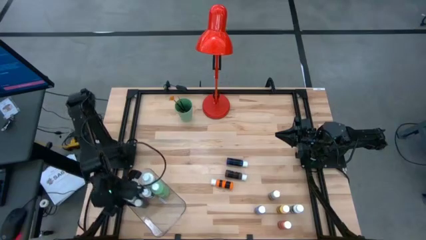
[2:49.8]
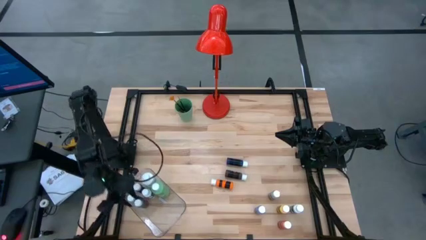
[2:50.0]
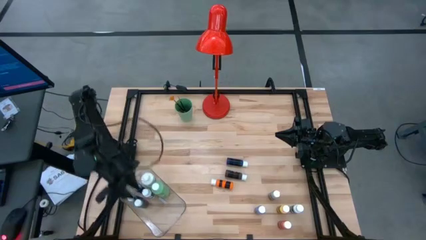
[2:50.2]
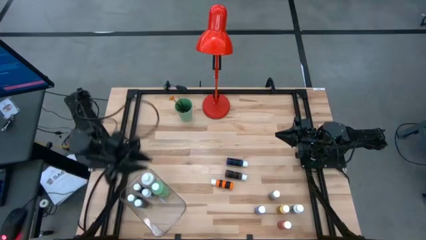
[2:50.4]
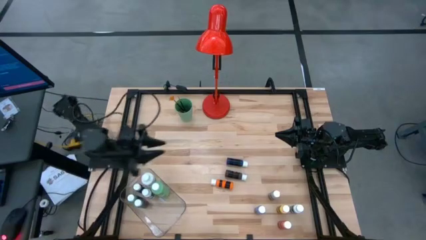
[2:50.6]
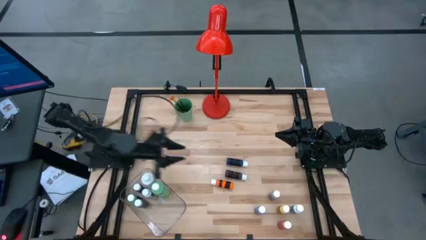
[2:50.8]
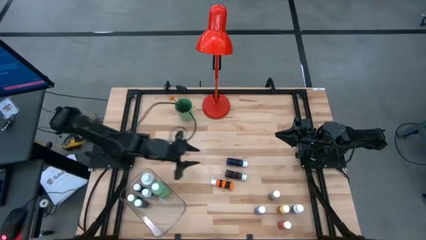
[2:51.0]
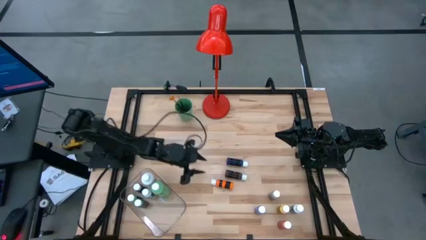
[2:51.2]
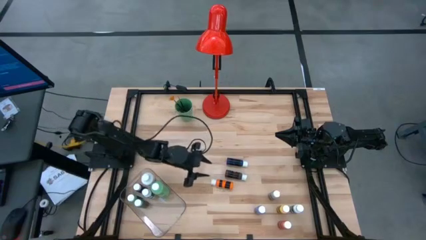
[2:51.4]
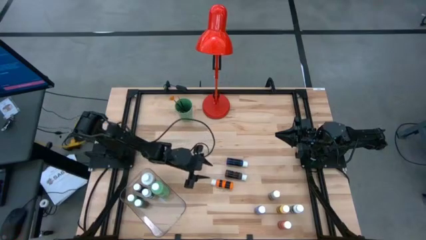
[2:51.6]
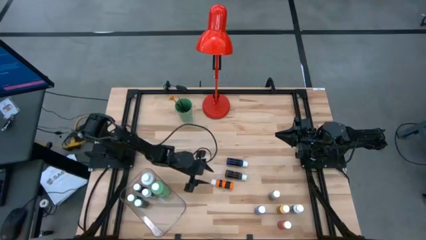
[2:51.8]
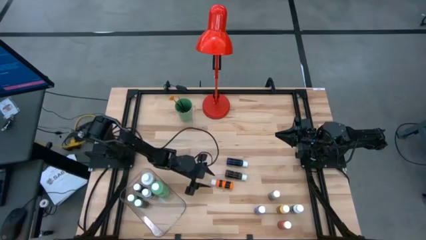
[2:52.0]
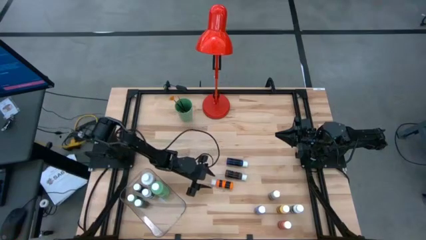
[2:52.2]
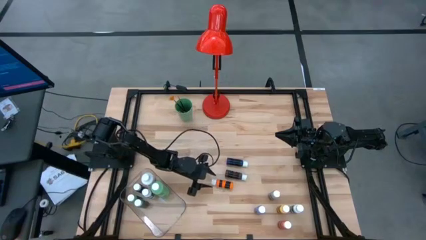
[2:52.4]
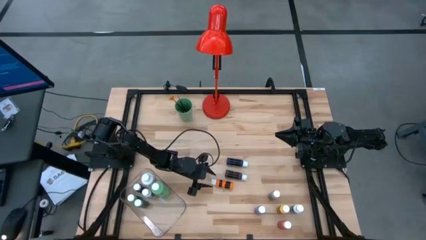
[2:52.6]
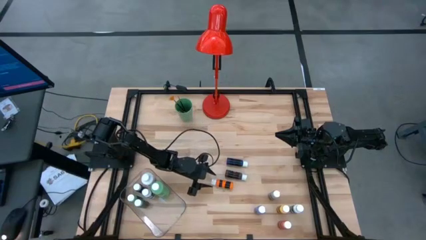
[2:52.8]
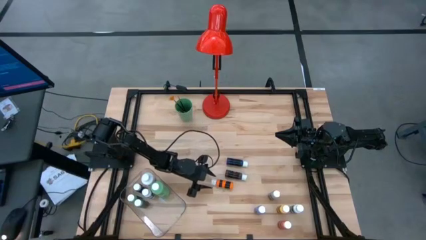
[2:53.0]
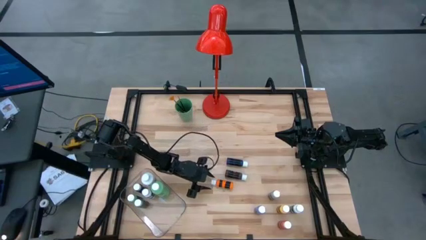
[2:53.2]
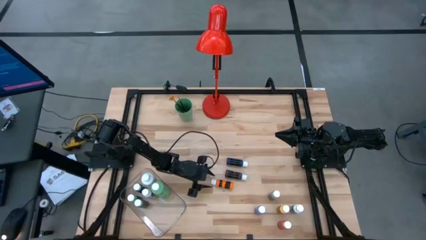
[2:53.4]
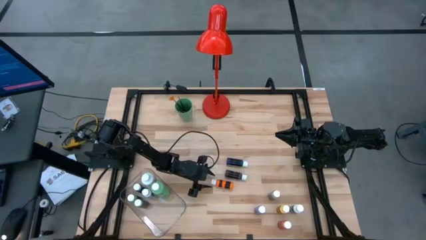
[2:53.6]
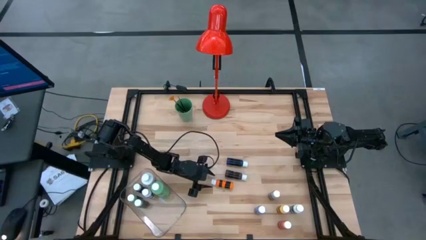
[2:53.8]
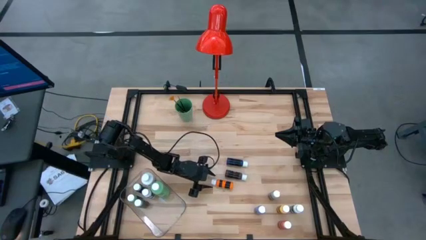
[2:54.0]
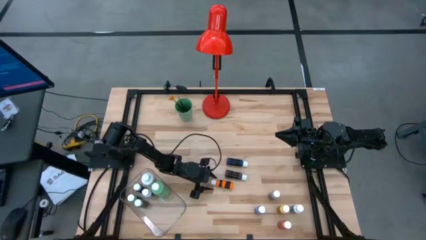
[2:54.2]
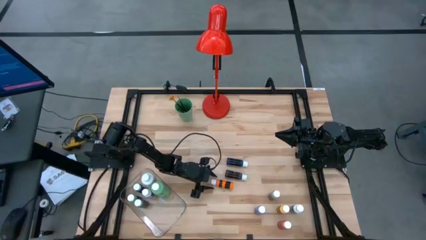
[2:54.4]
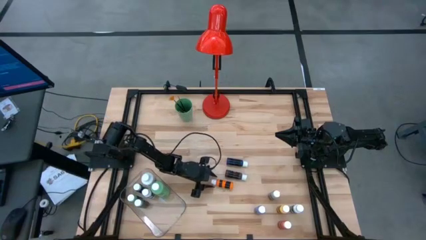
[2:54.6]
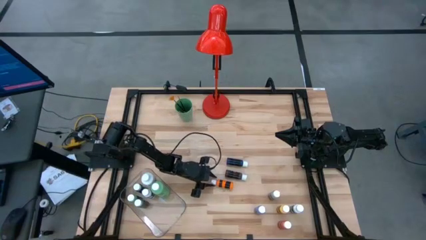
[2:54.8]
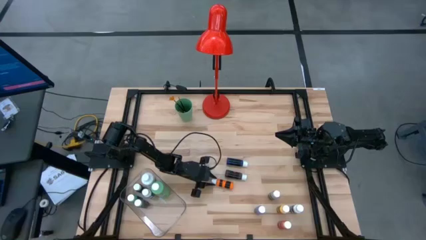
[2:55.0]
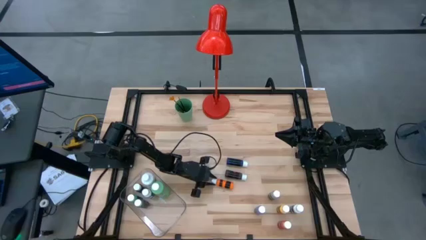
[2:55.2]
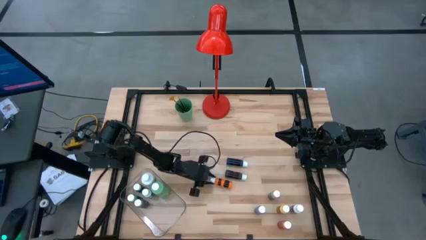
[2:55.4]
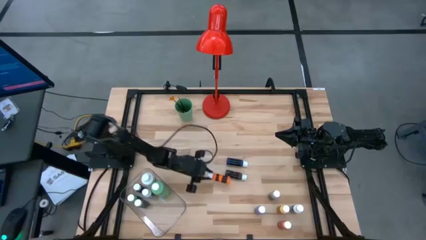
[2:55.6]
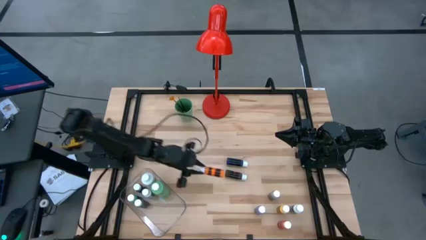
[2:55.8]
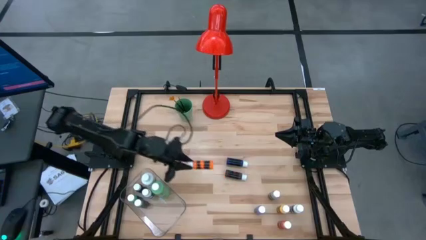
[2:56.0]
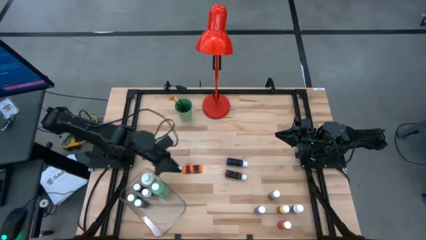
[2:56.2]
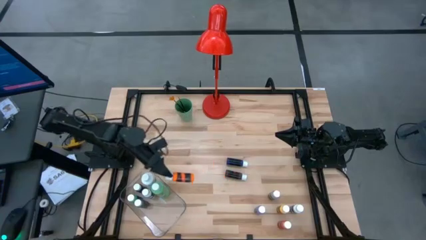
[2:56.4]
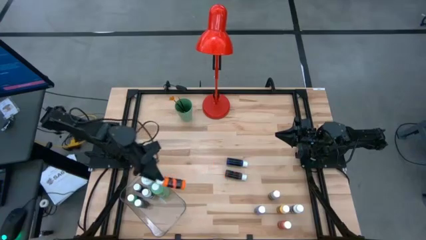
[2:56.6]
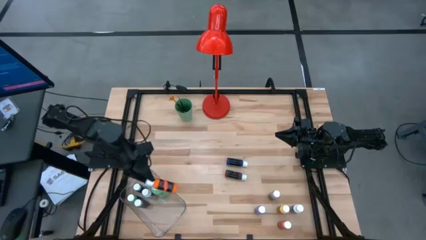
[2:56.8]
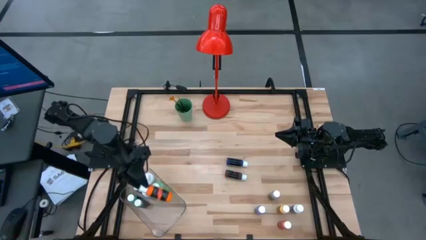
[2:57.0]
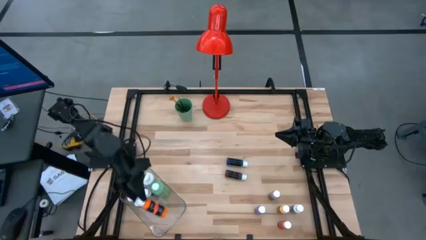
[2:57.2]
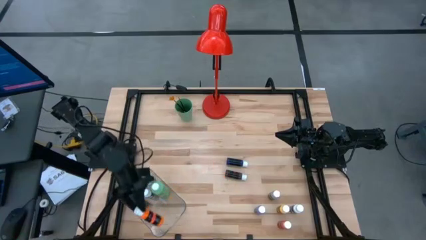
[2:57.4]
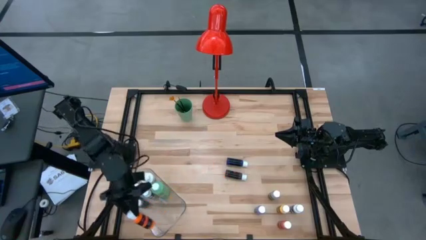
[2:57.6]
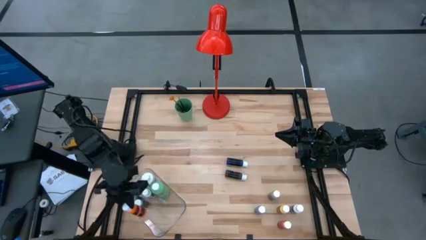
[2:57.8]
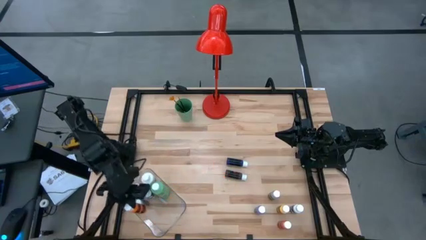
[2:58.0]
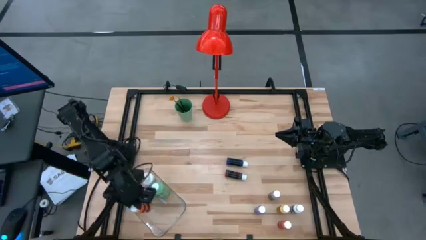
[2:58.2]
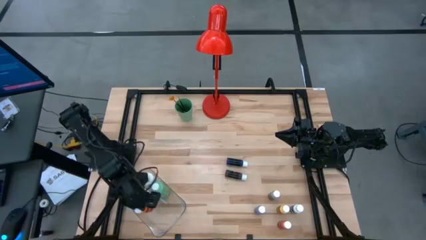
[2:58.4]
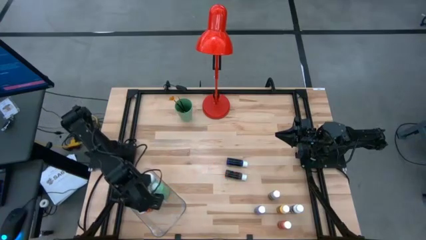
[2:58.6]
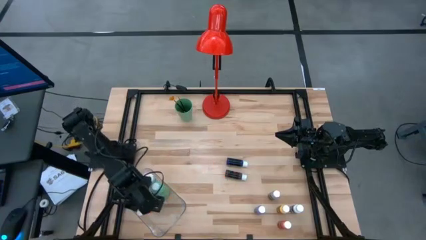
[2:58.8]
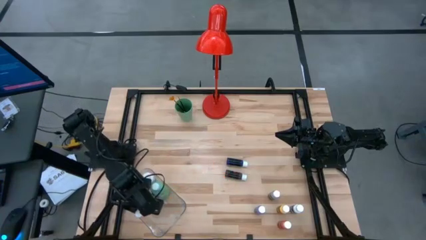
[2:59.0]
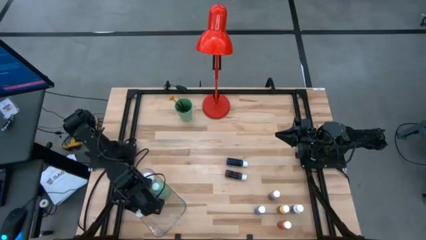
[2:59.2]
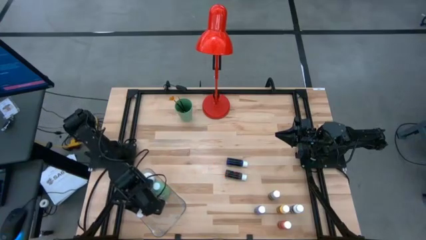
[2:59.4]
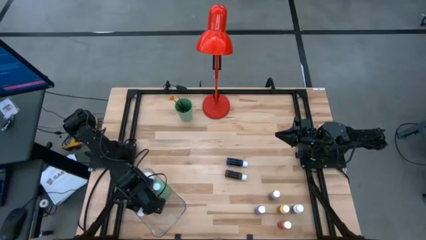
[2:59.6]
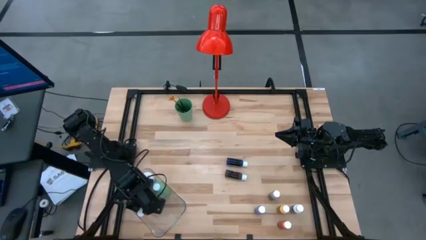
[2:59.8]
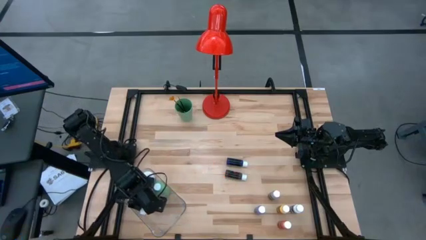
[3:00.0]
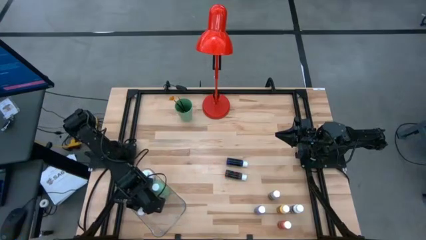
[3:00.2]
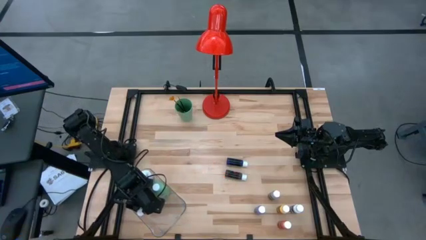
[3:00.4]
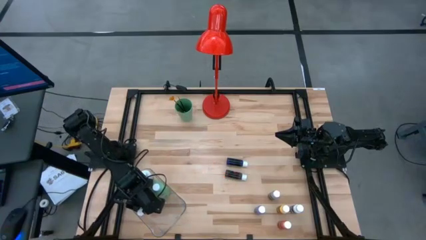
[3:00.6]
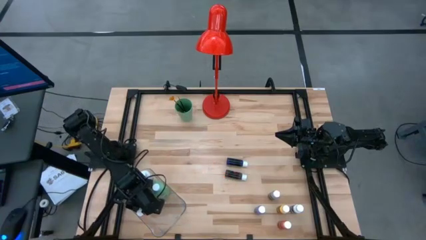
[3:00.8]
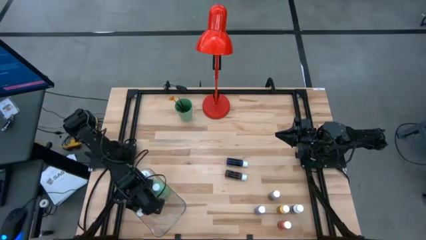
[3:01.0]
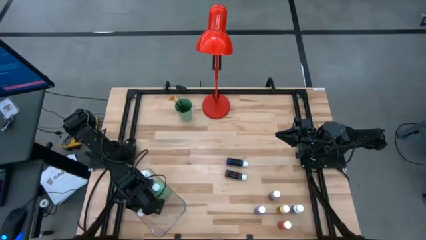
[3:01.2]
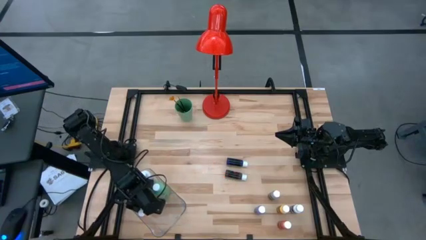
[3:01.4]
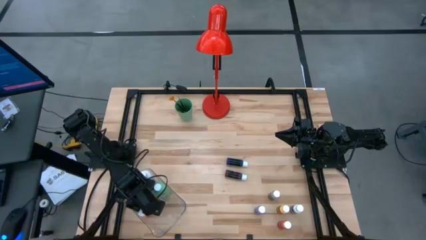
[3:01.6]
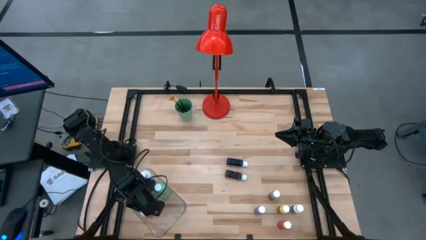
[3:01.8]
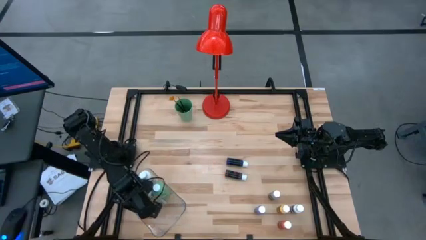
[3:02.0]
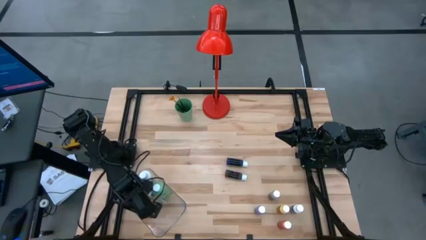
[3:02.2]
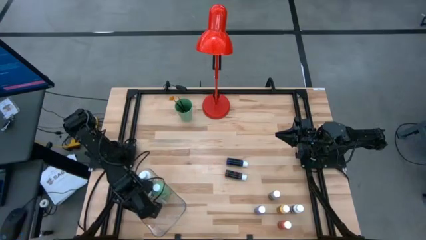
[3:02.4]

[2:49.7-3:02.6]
Task: Pick & Place Paint Supplies
Put the orange coloring bottle into the transparent bin

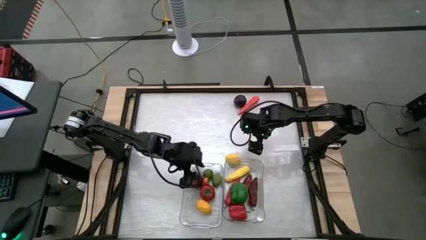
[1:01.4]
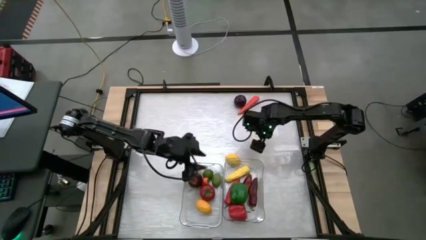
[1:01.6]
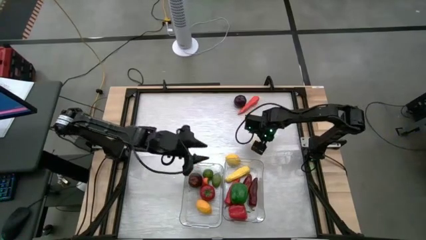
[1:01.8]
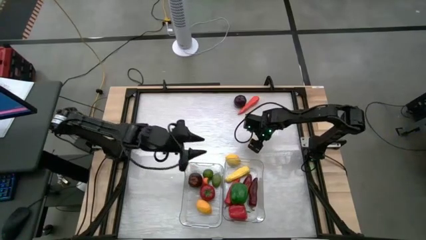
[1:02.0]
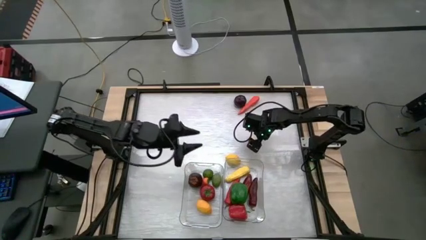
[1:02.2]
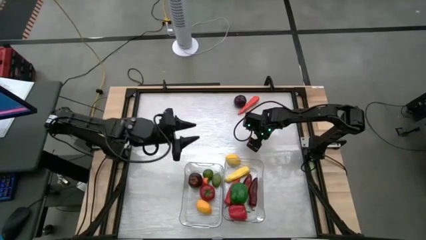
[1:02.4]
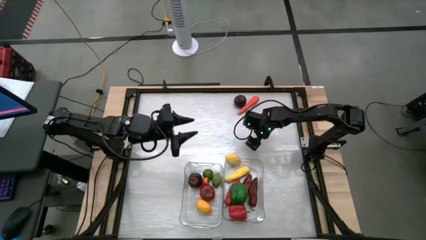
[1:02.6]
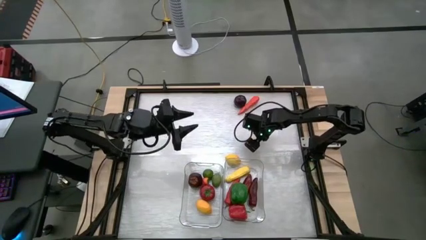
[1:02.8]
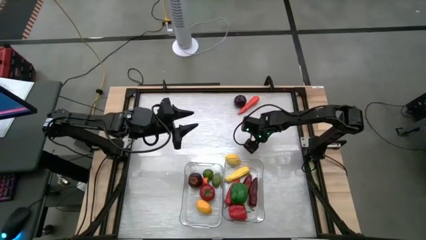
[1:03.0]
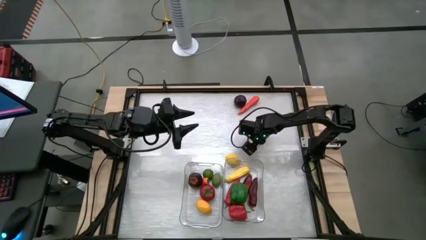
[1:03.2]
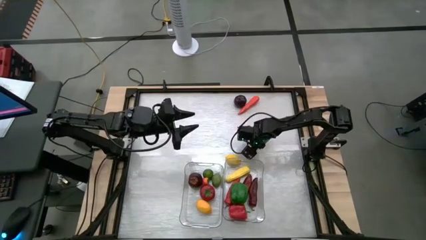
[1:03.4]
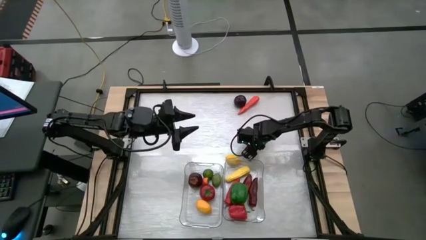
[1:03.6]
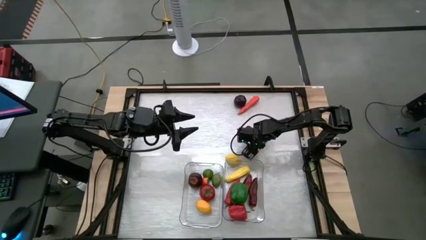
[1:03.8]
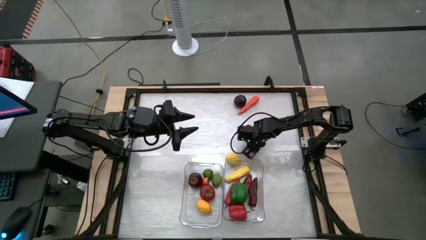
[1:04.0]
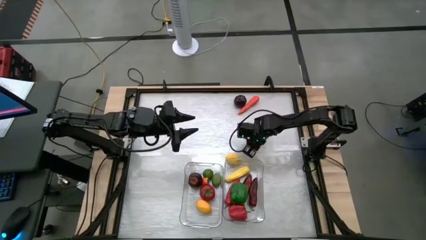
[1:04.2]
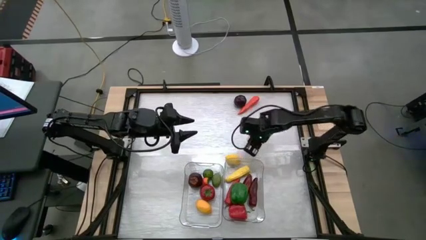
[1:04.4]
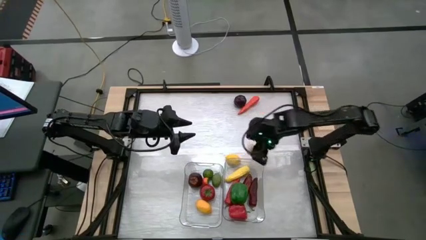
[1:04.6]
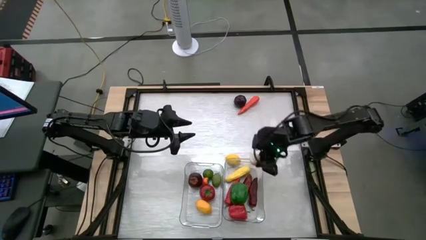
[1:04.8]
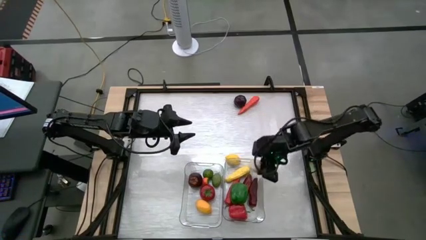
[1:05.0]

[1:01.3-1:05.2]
Task: Sort produce into baskets
Put the garlic into the right transparent bin
